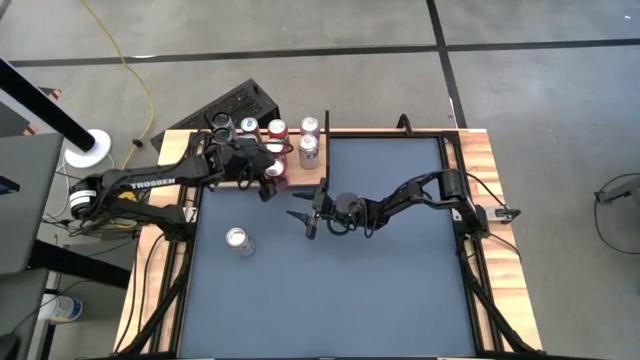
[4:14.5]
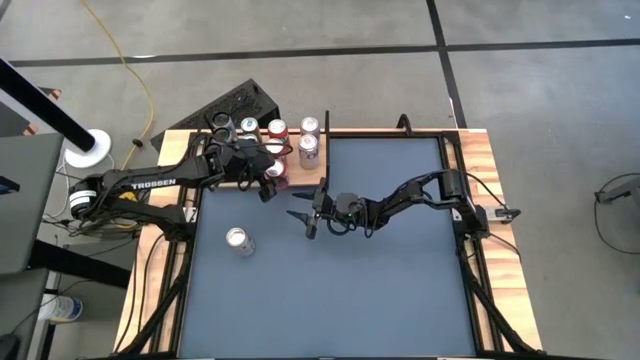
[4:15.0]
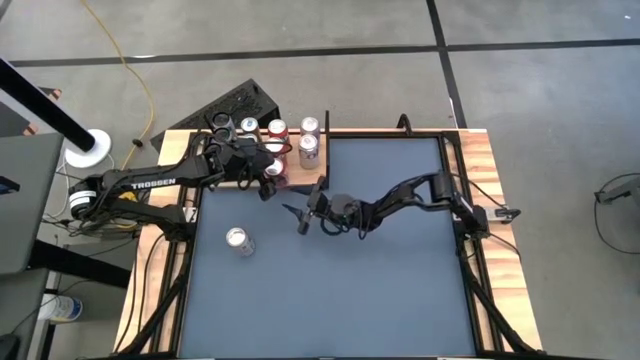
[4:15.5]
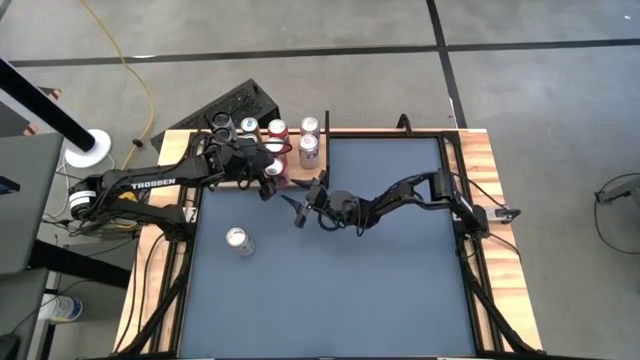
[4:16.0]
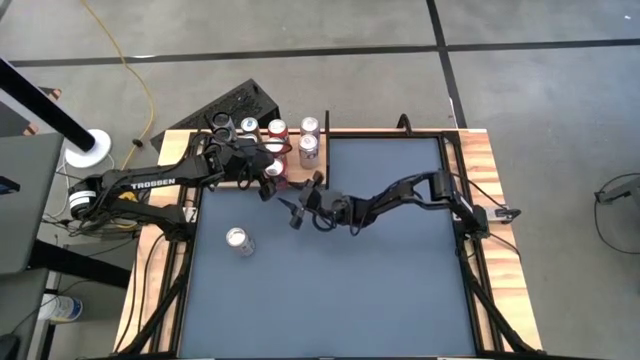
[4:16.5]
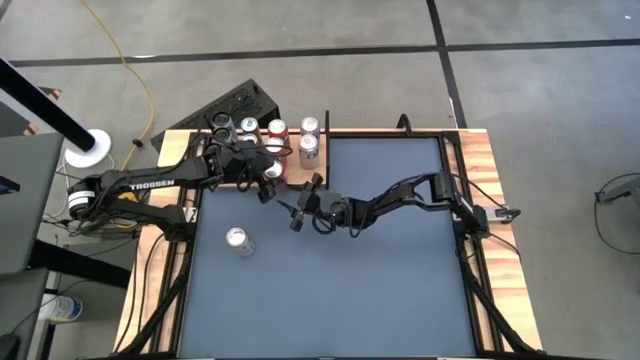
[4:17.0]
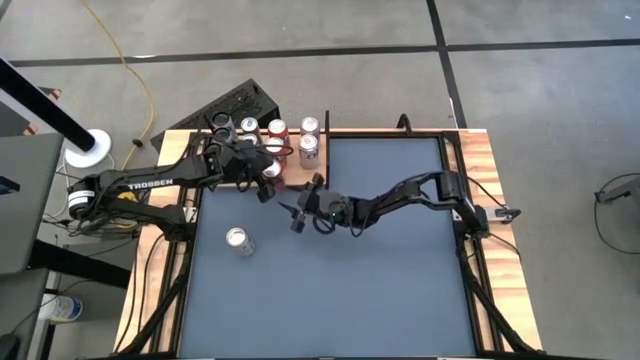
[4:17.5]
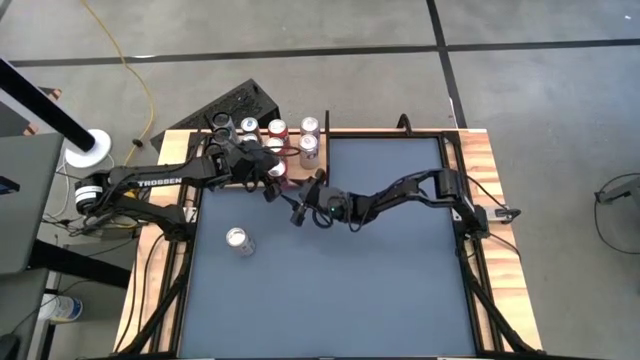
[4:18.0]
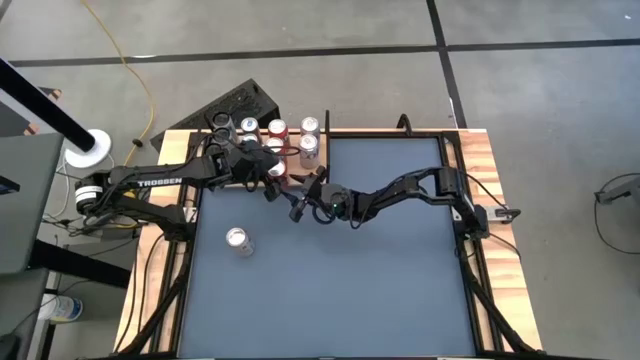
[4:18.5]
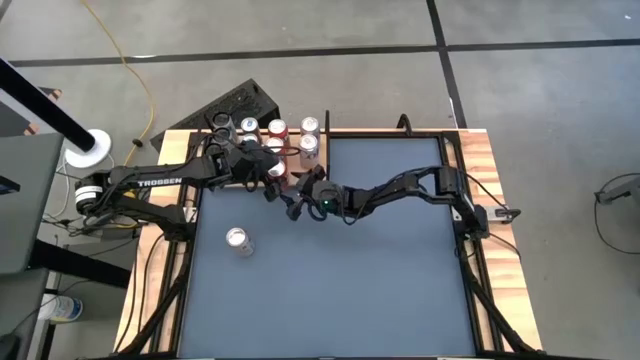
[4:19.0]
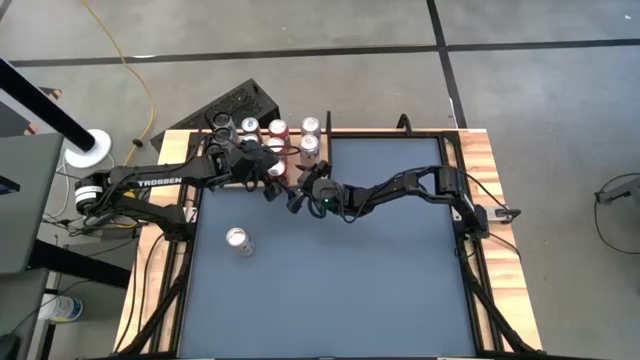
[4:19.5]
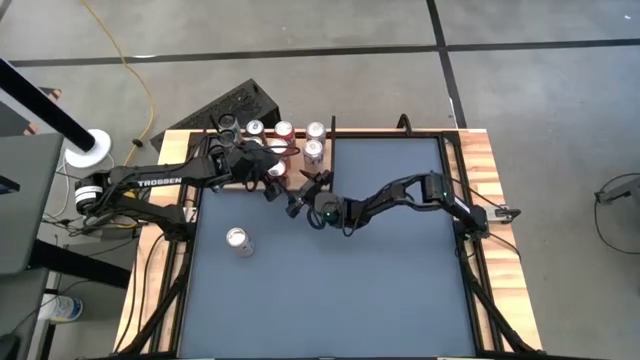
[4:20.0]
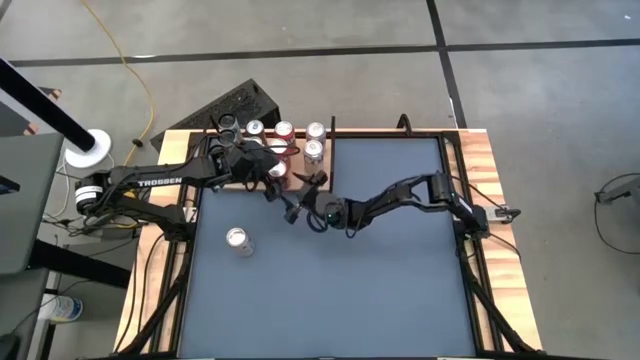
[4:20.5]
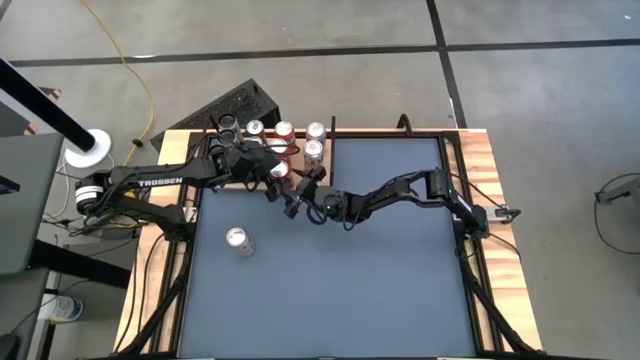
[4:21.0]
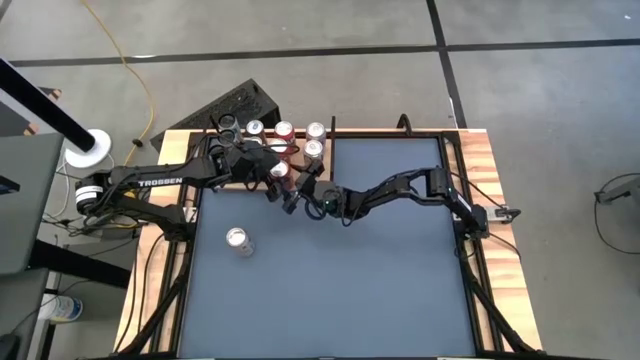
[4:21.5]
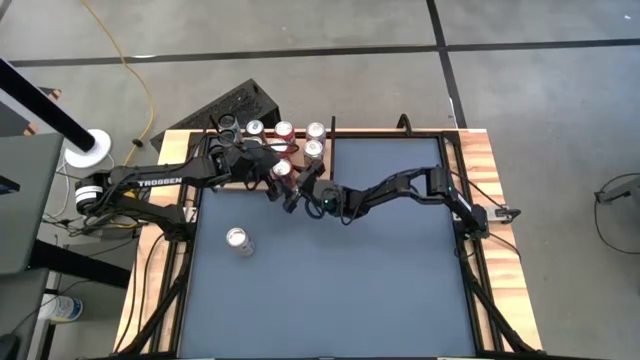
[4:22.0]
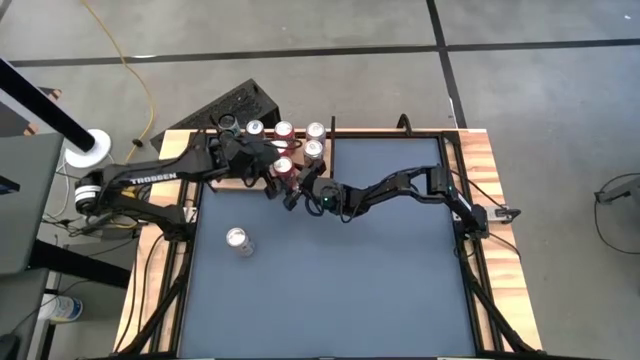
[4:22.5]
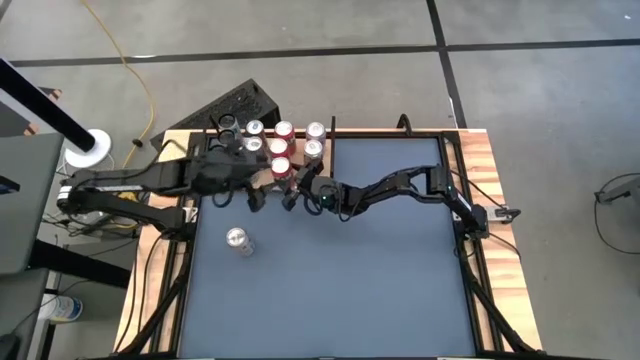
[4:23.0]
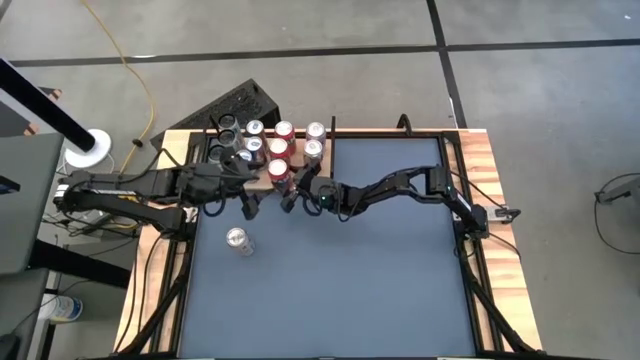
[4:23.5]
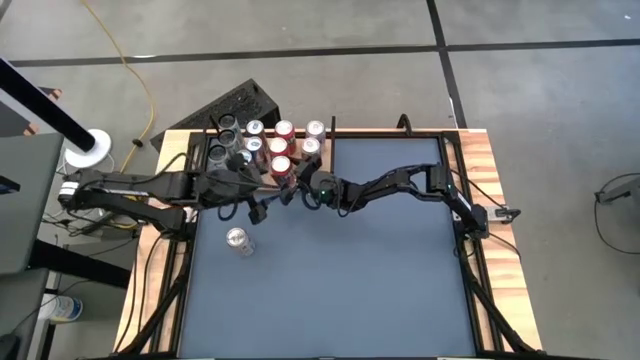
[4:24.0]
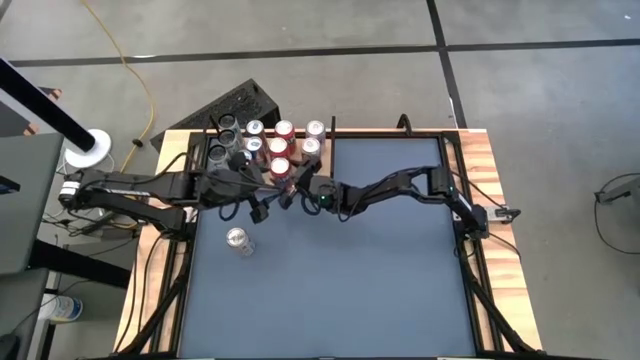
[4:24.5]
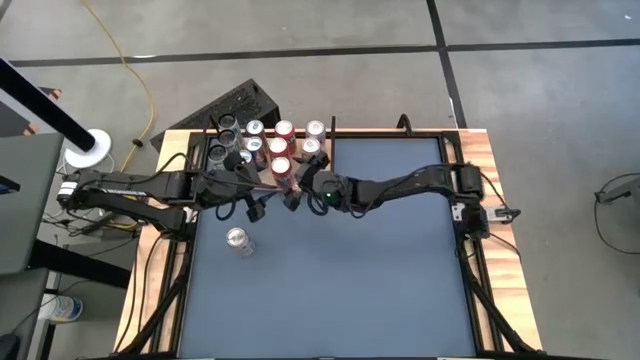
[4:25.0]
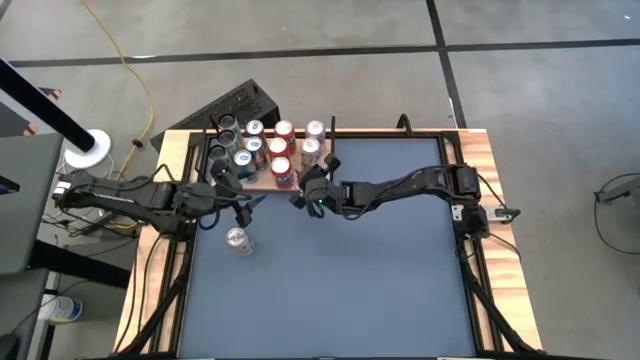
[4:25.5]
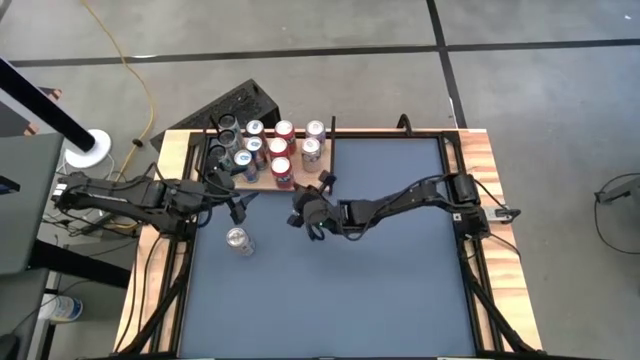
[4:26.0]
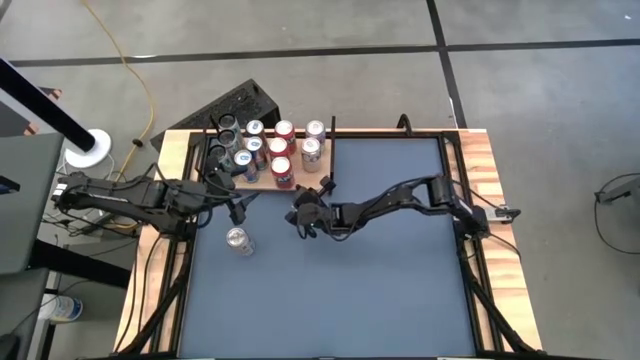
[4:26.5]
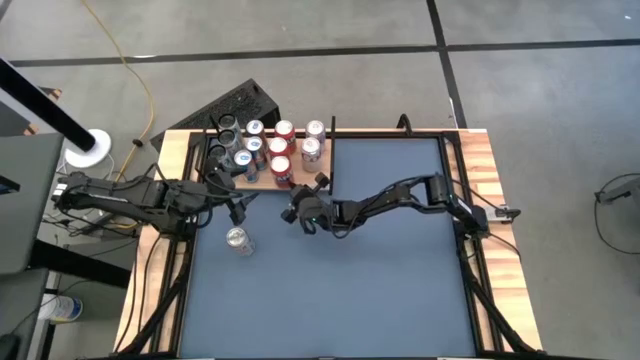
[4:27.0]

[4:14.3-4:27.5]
Task: Place canned beverage on shelf
Put the red soda can on the shelf aligned with the other orange soda can

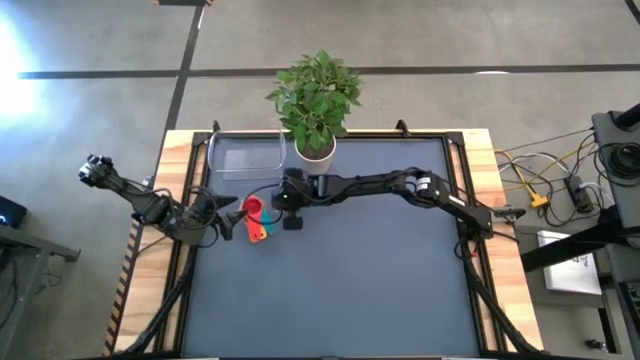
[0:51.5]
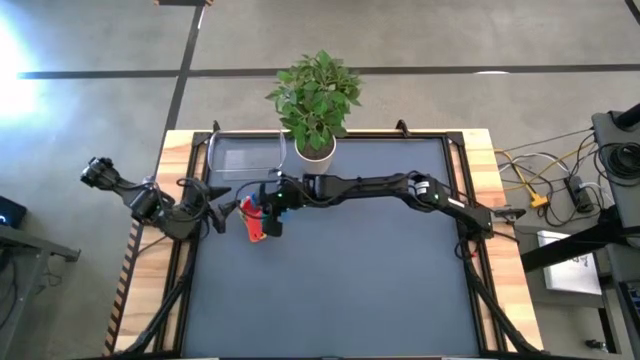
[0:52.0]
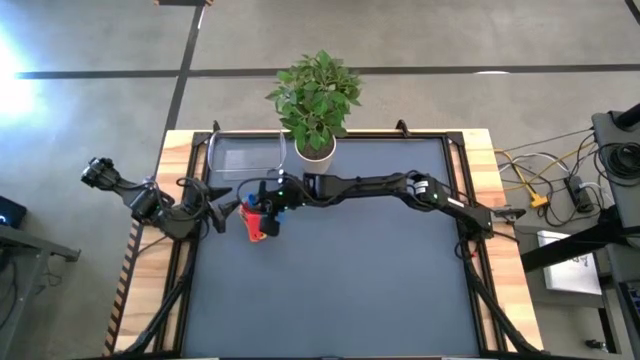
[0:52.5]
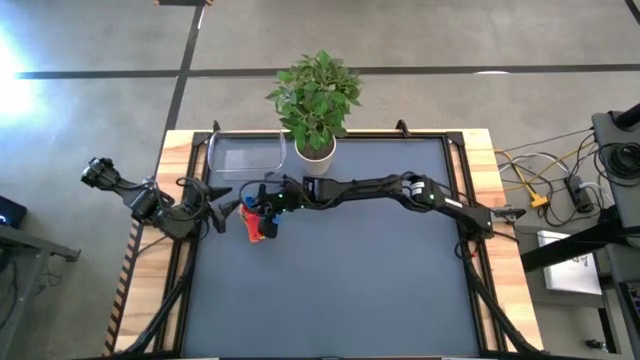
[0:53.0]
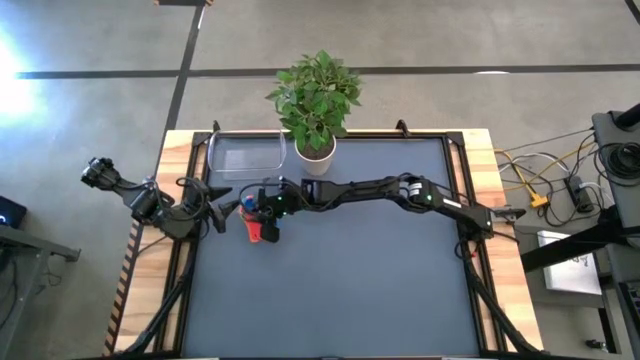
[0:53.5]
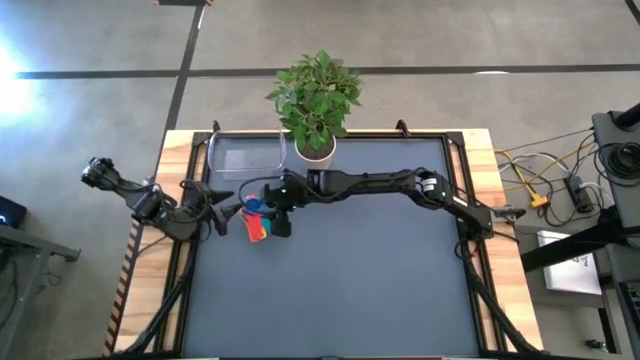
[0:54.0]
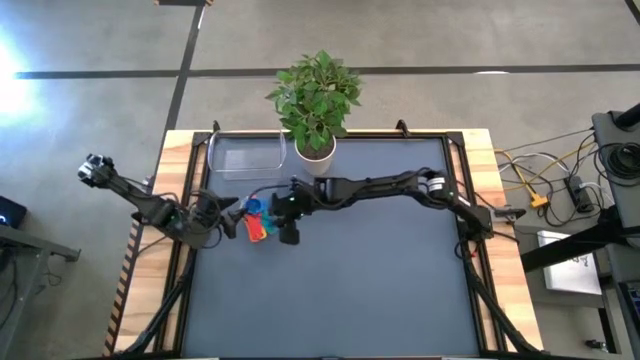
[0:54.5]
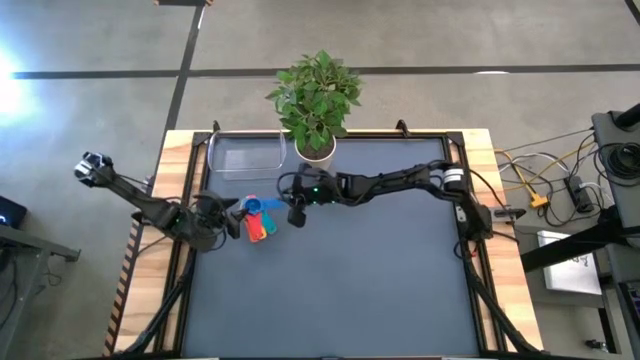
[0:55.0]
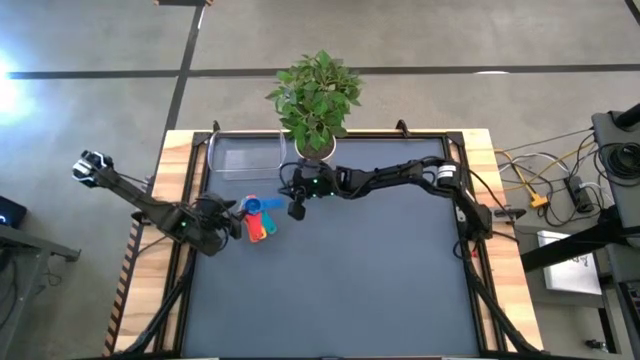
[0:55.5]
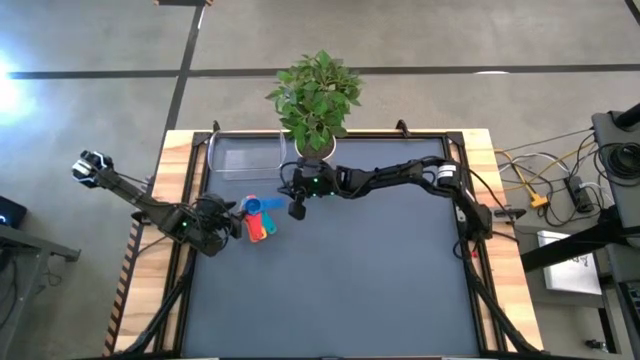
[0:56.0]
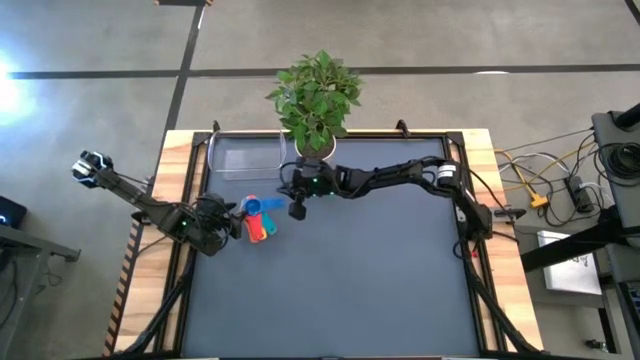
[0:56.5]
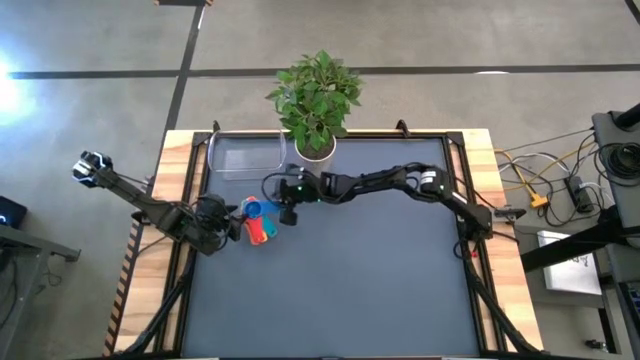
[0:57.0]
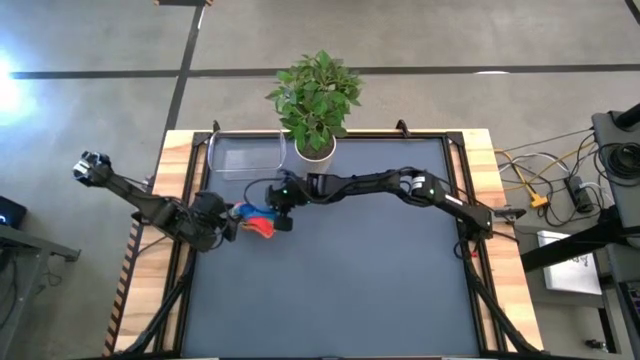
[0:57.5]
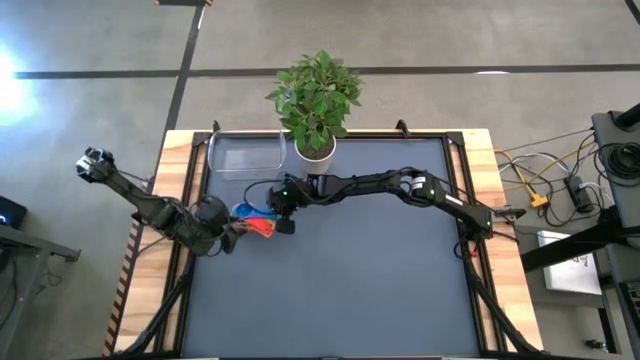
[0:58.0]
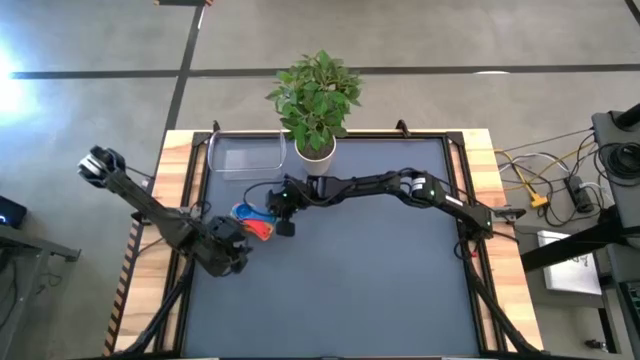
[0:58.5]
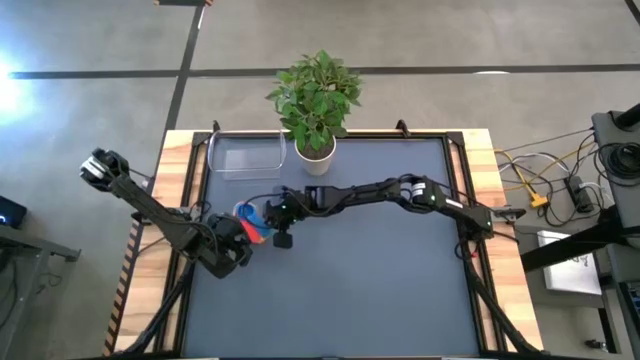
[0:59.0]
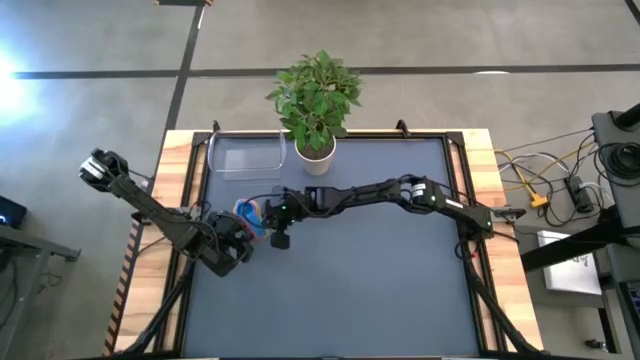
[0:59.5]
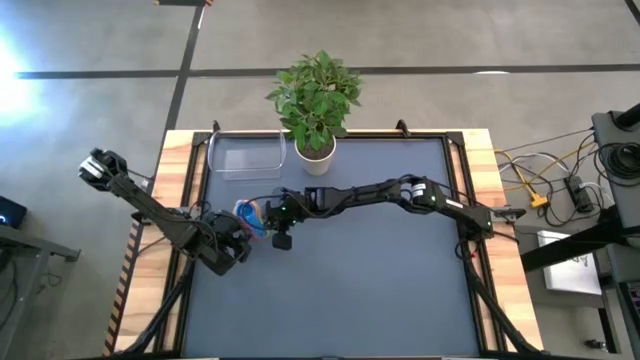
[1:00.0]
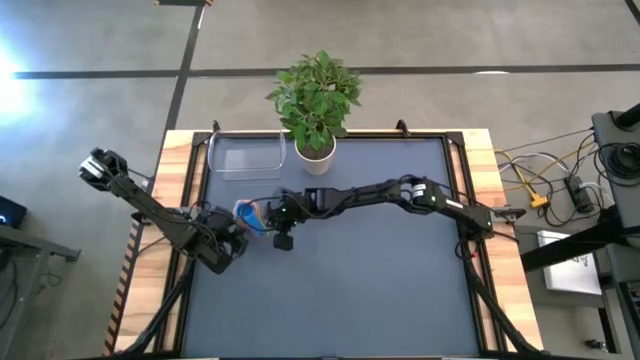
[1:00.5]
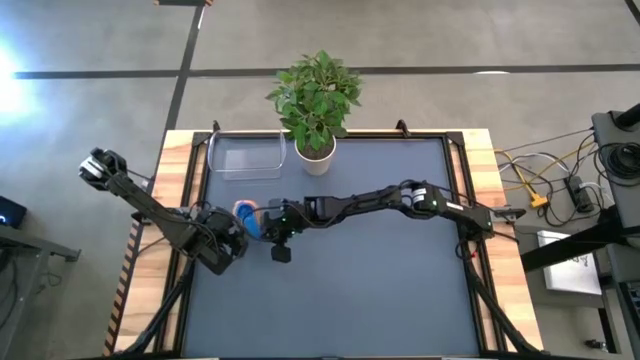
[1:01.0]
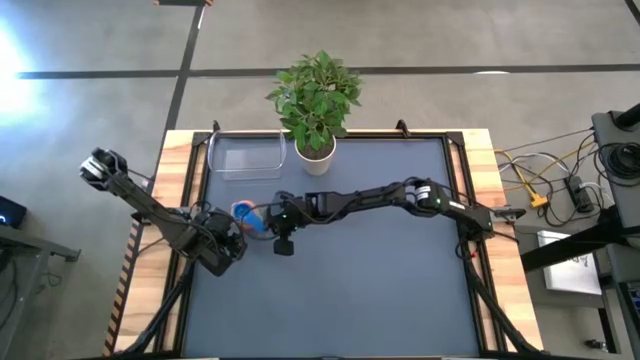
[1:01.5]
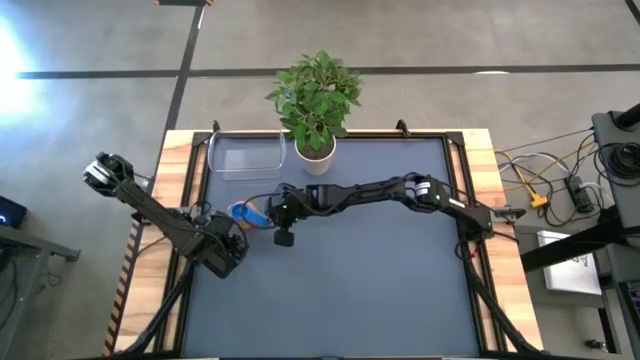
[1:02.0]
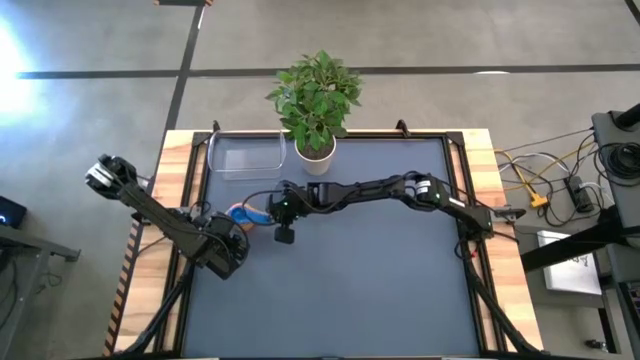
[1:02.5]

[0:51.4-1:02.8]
Task: Nest measuring cups in basket
Stack the blue measuring cup on top of the red measuring cup
